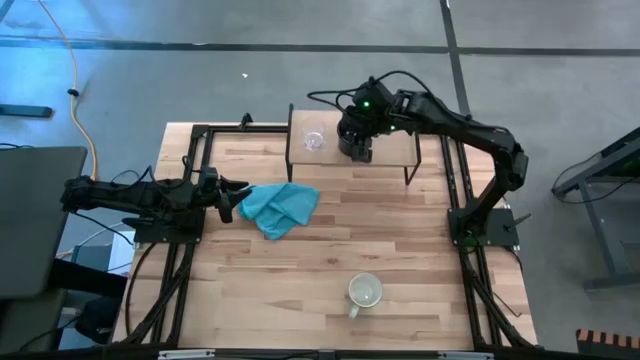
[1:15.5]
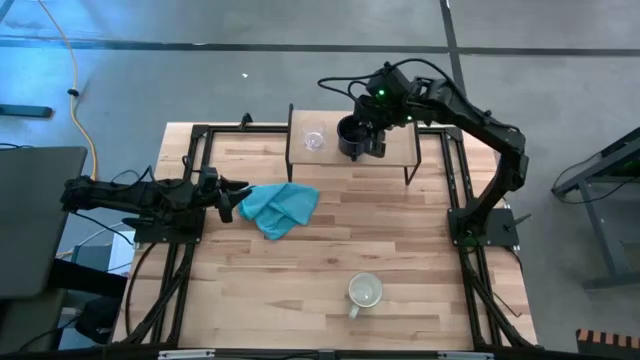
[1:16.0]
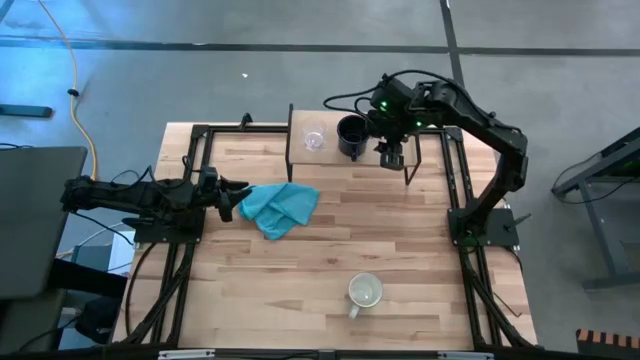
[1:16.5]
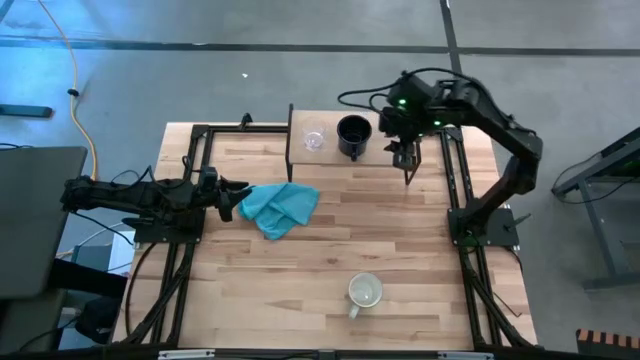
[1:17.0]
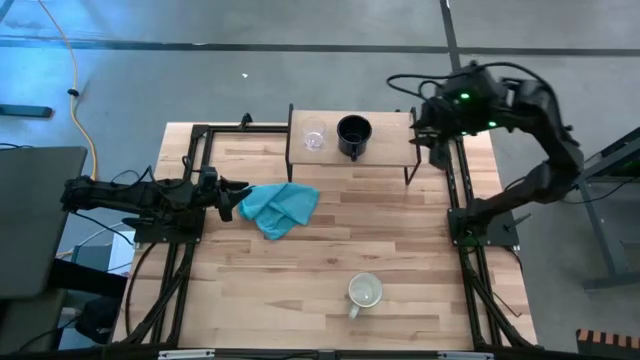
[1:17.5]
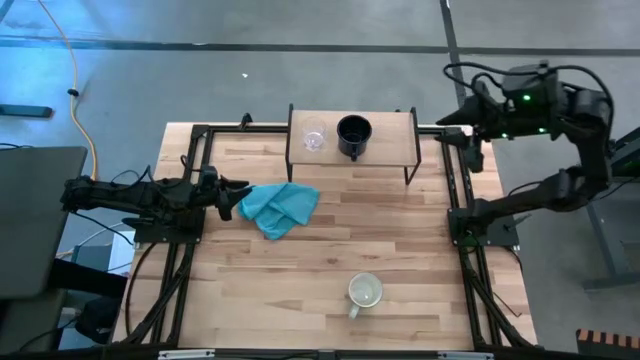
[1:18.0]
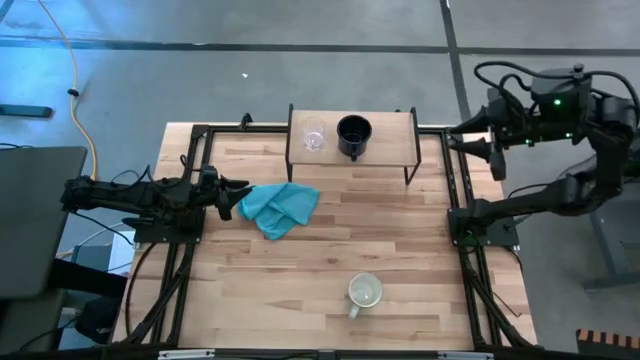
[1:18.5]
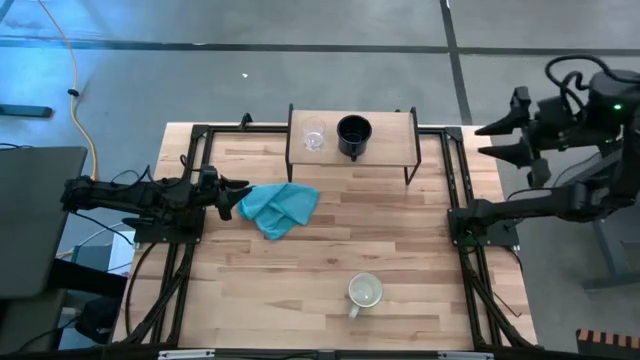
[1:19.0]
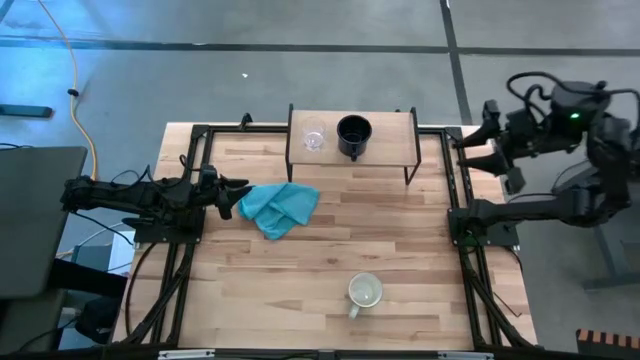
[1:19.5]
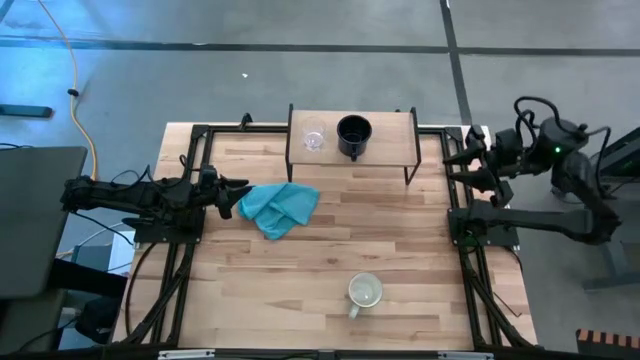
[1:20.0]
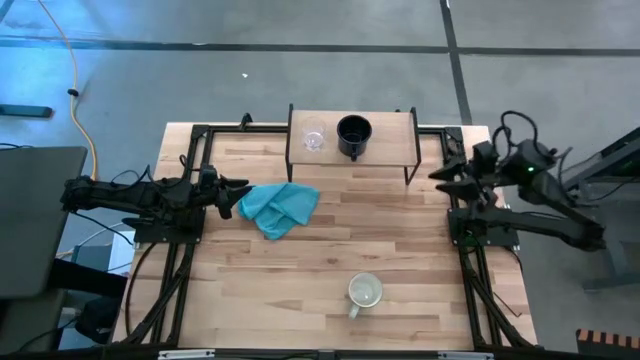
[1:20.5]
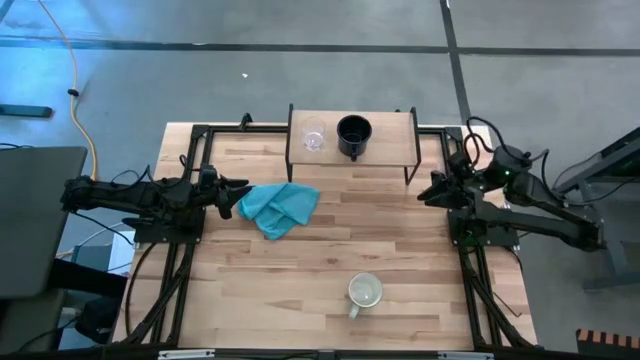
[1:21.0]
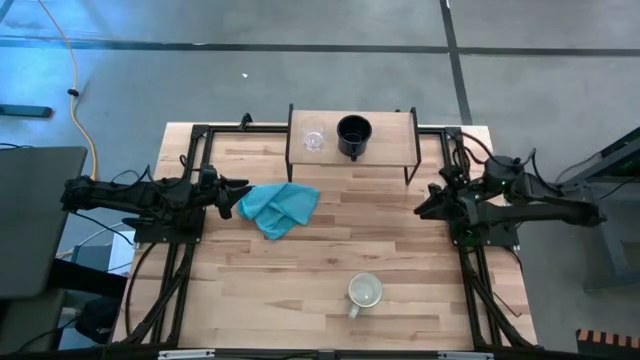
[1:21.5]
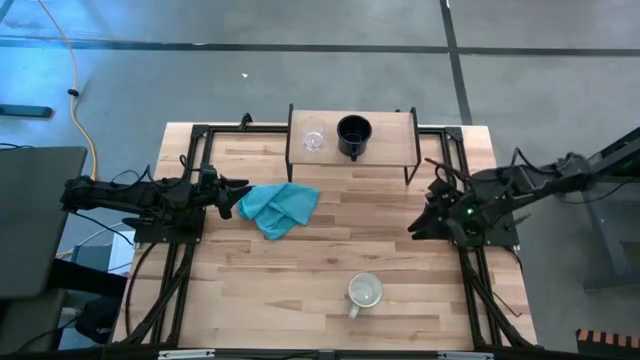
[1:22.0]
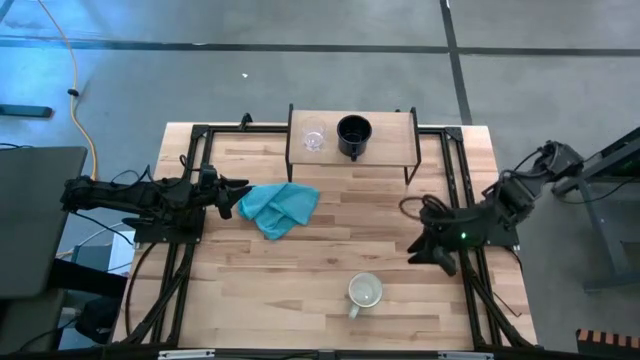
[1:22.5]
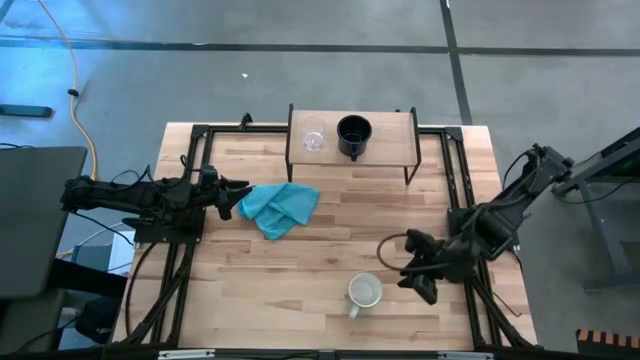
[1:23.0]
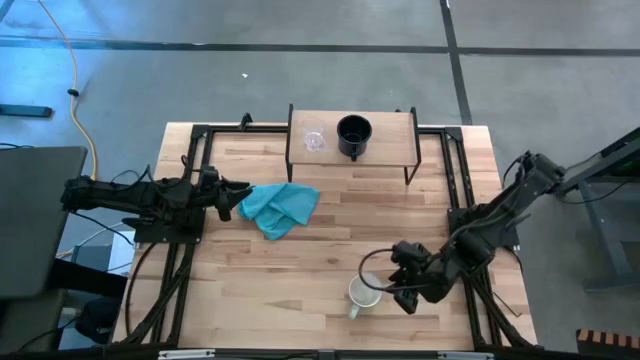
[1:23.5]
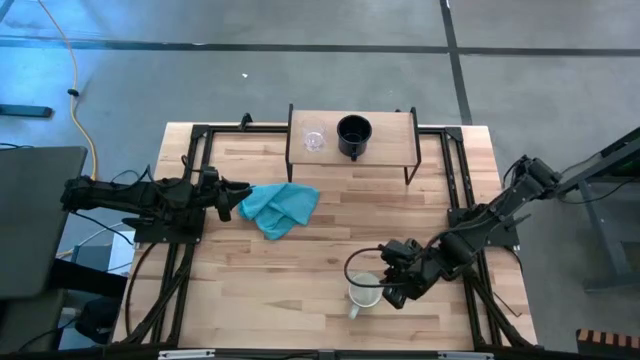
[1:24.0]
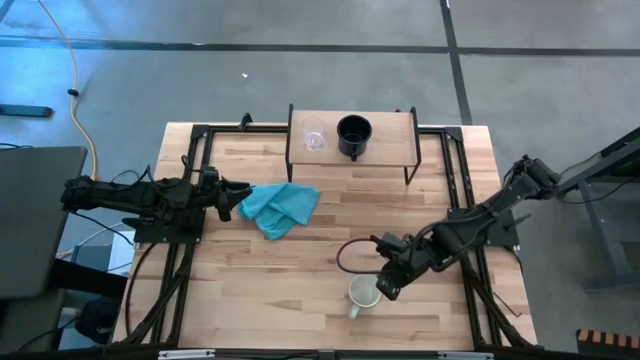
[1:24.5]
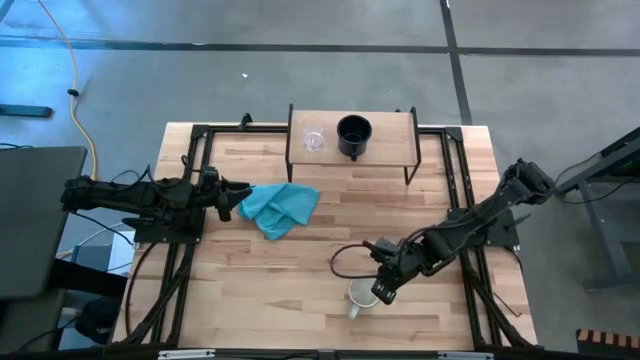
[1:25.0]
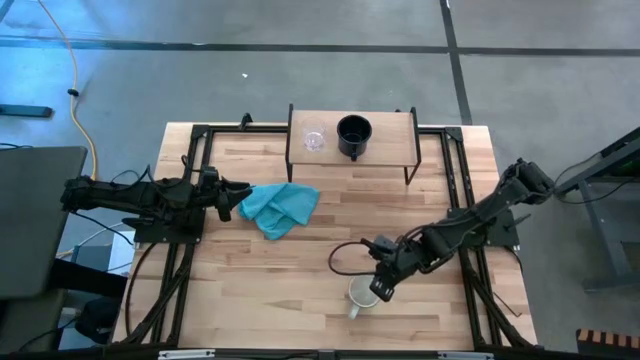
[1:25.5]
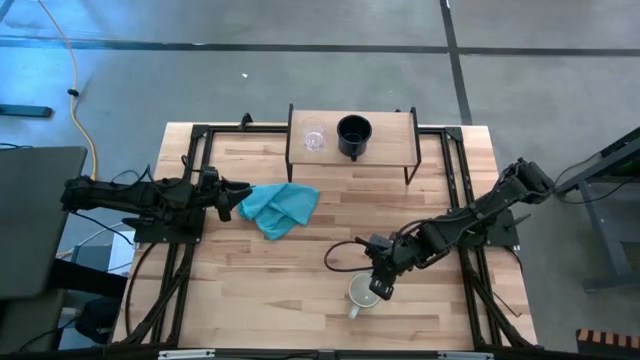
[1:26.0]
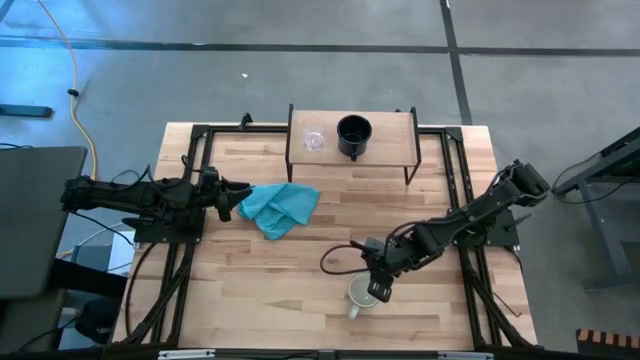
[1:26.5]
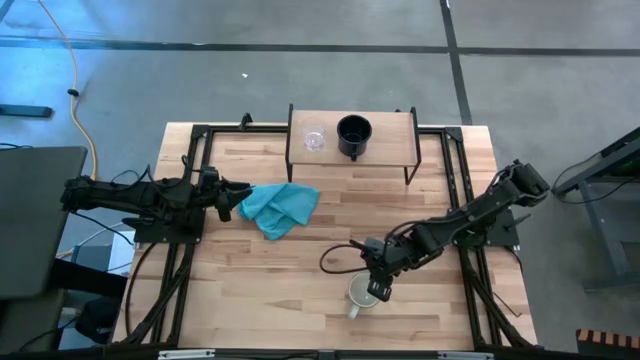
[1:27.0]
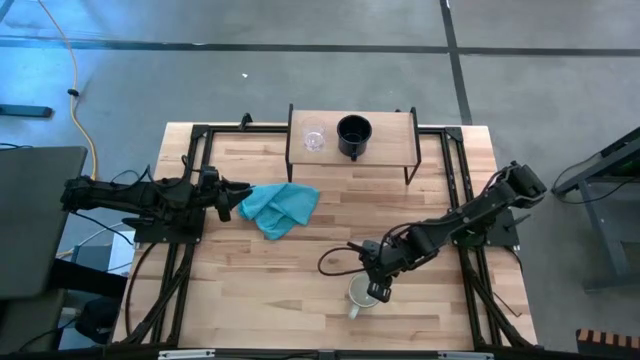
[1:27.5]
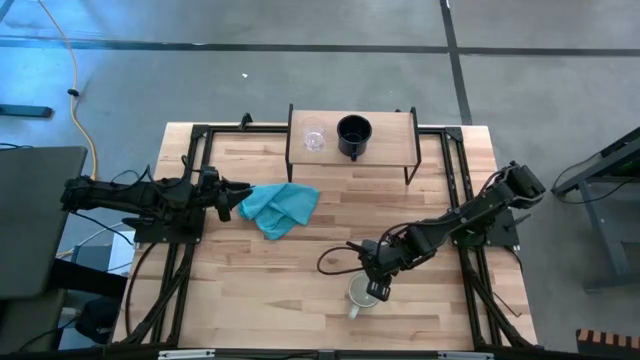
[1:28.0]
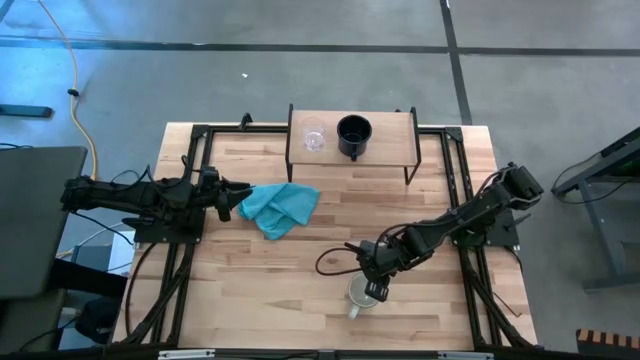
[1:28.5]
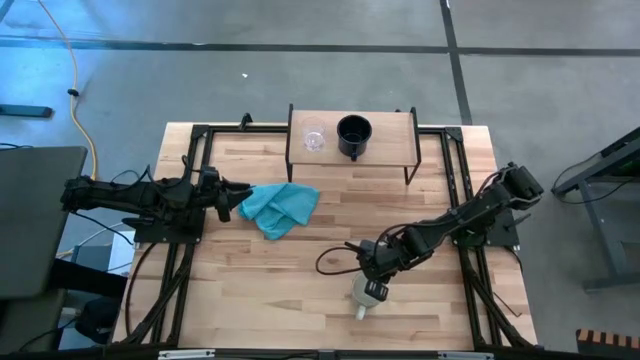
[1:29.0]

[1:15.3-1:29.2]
Task: Stack small to large cups/mugs on shelf
Put the light blue mug on the shelf

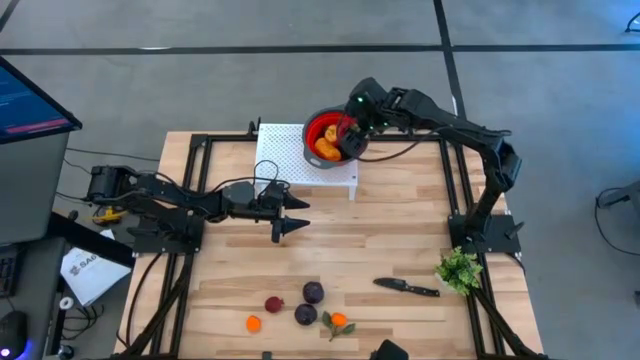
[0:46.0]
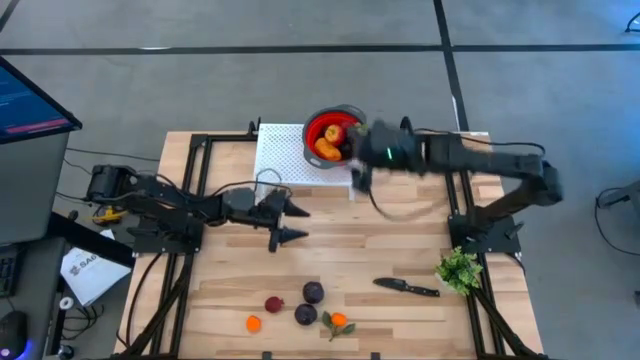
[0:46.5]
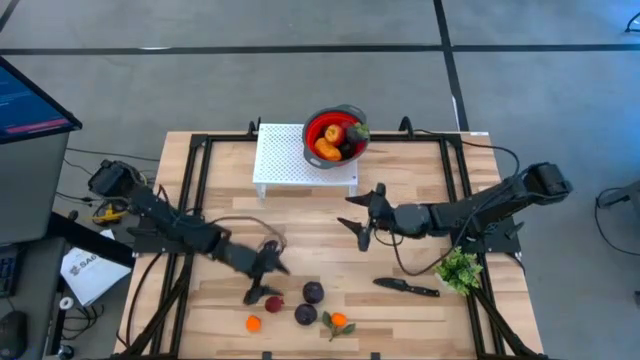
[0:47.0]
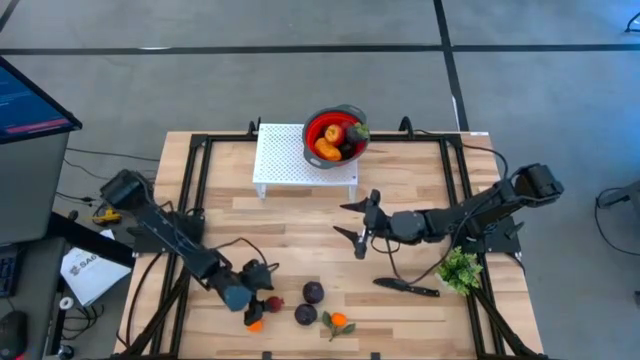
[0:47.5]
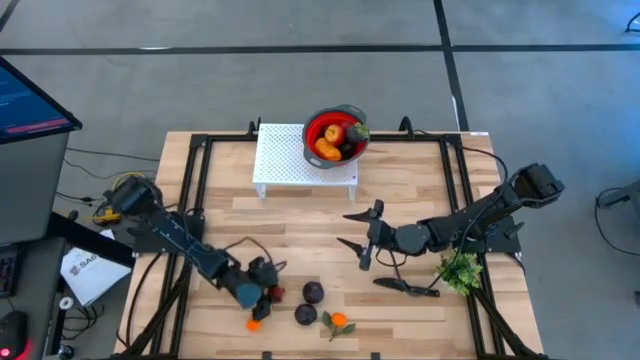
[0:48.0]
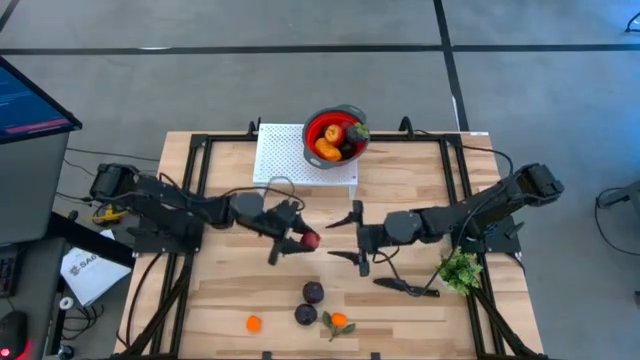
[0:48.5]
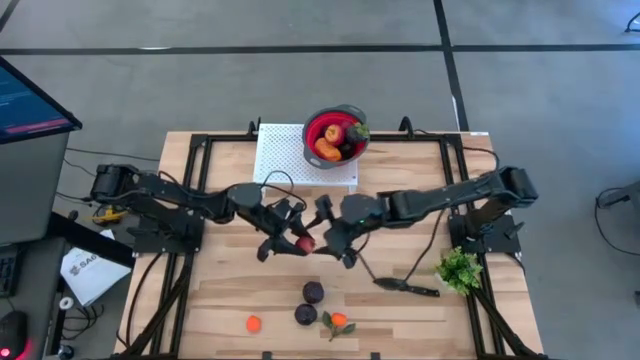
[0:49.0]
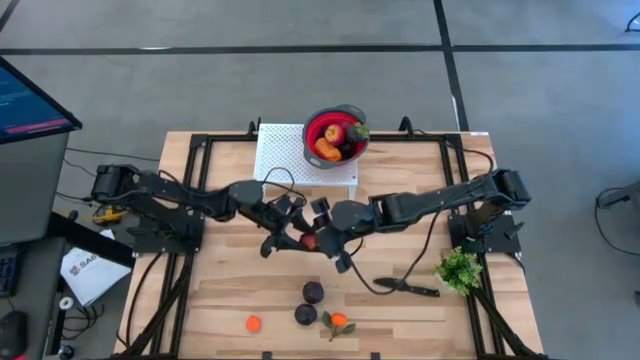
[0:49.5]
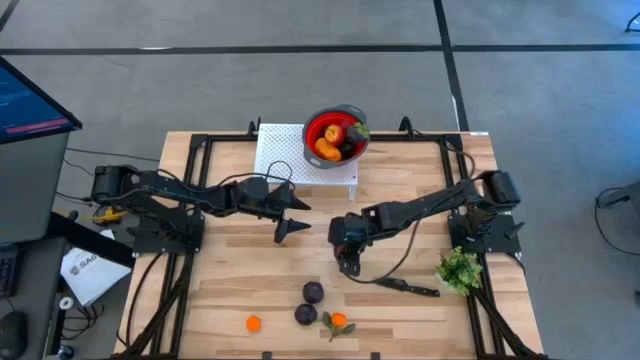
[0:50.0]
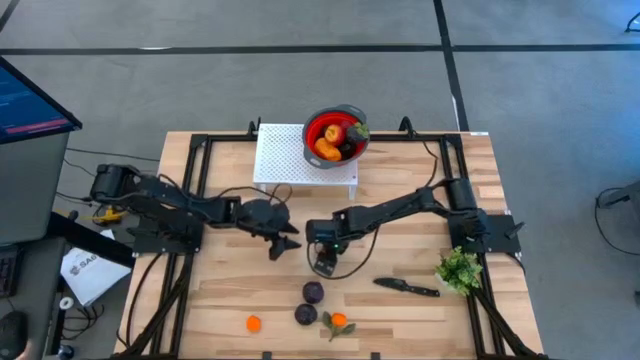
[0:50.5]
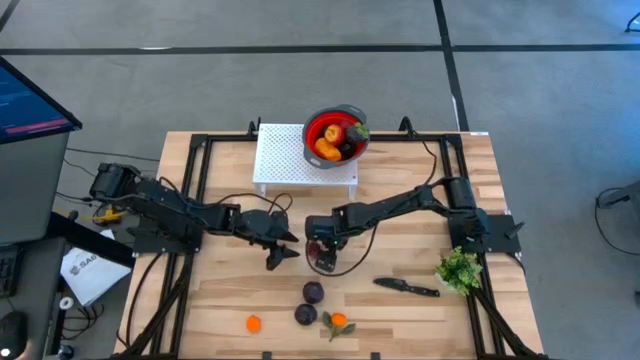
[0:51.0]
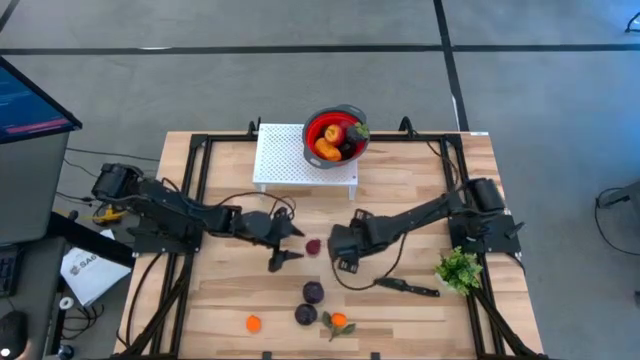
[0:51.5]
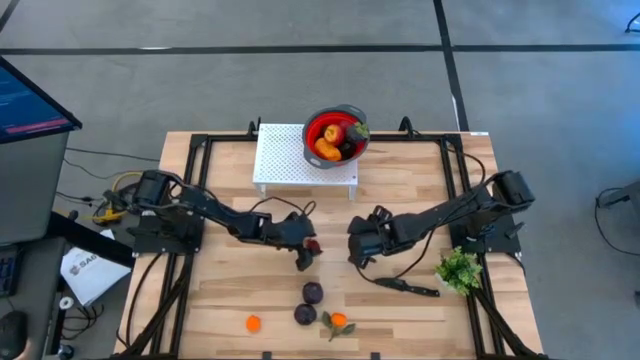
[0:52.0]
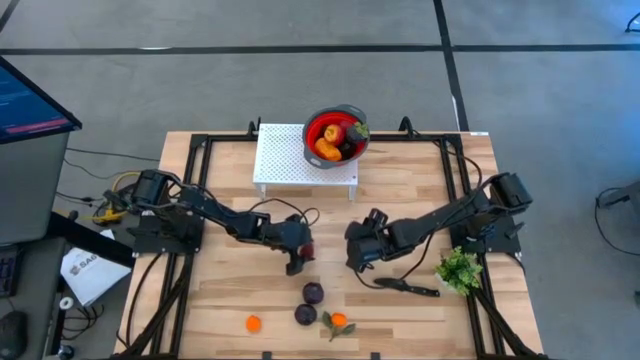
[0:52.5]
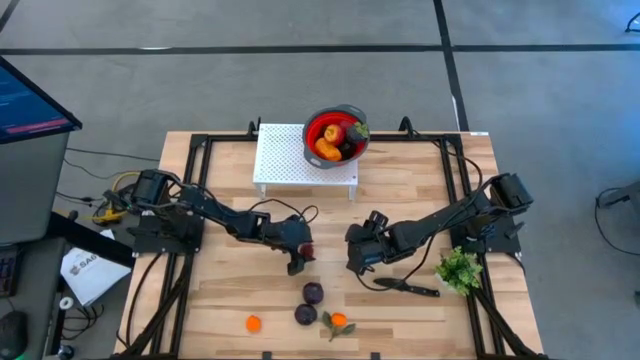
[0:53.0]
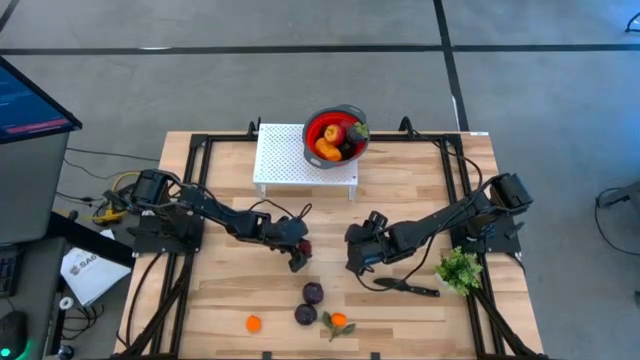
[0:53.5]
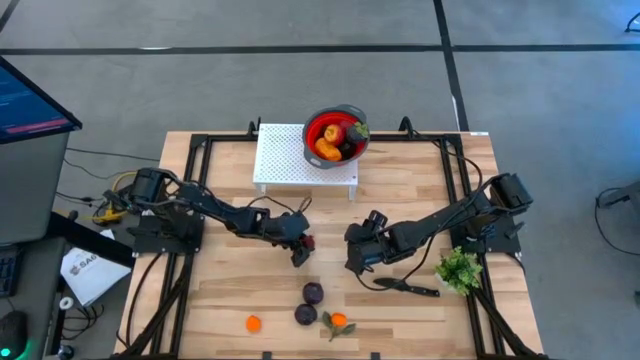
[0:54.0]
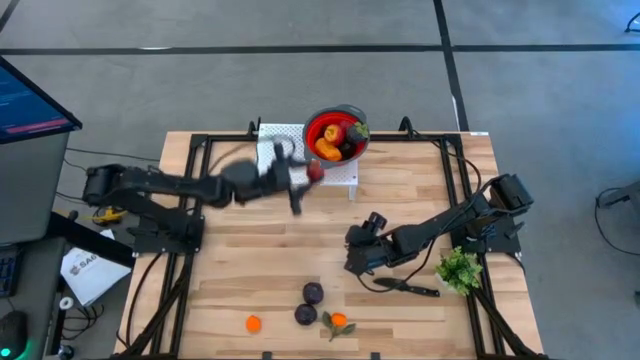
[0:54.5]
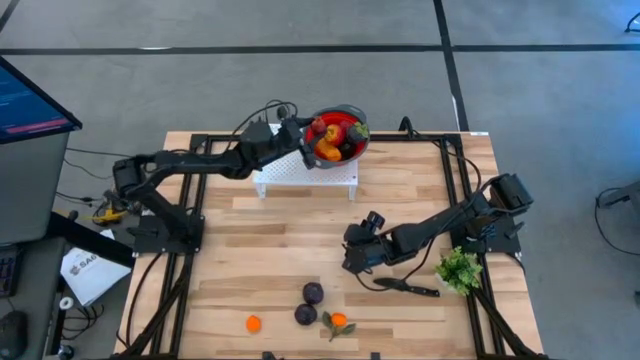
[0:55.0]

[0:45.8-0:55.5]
Task: Pick & Place Fruit
Put the pomegranate into the red strainer on the shelf
